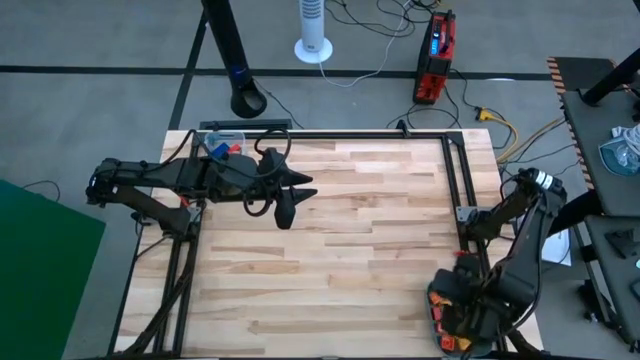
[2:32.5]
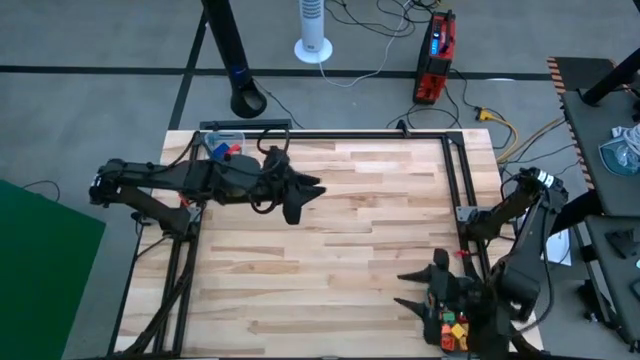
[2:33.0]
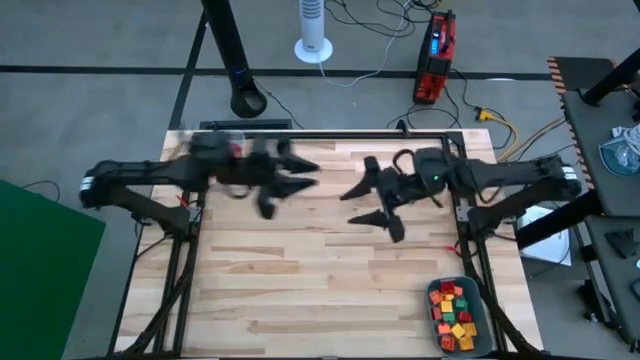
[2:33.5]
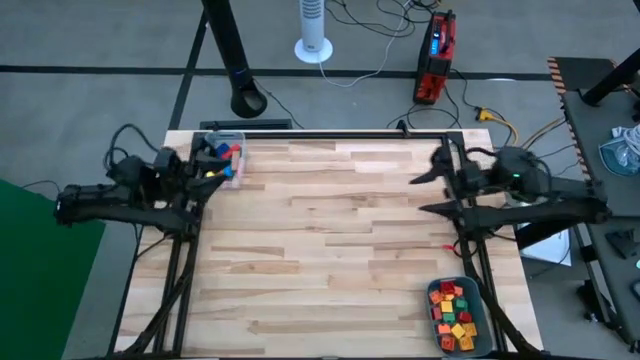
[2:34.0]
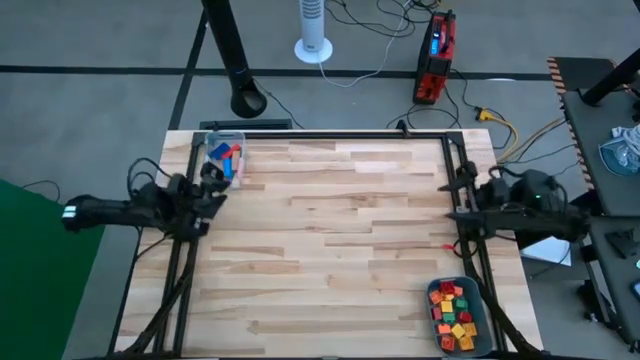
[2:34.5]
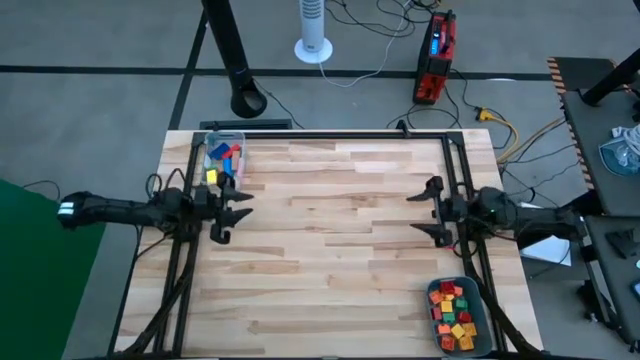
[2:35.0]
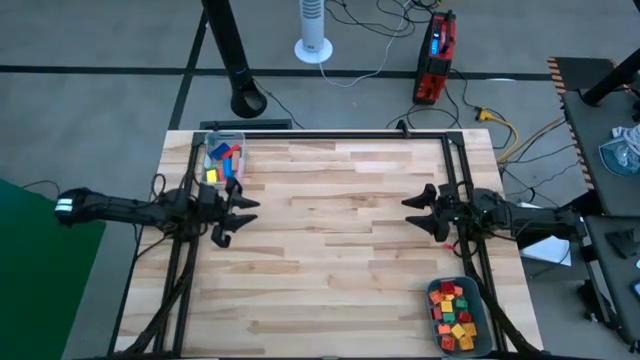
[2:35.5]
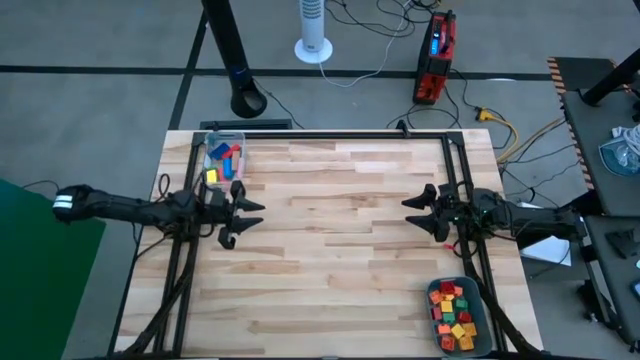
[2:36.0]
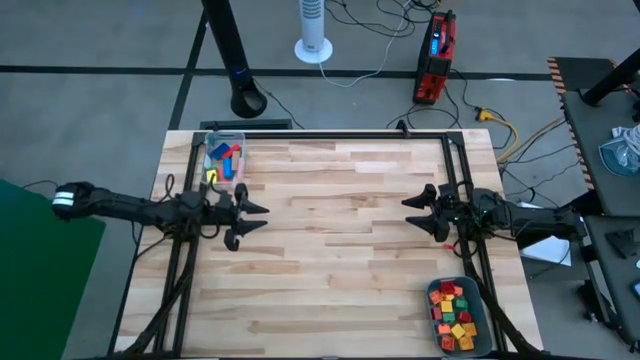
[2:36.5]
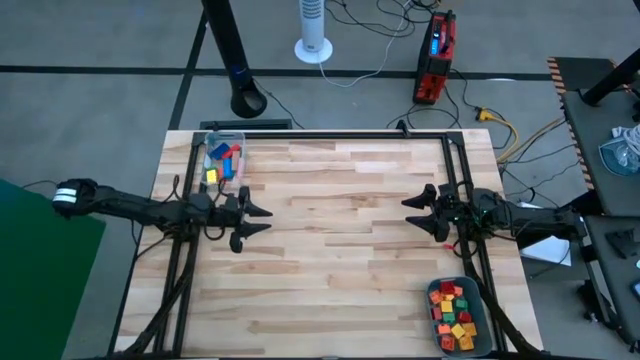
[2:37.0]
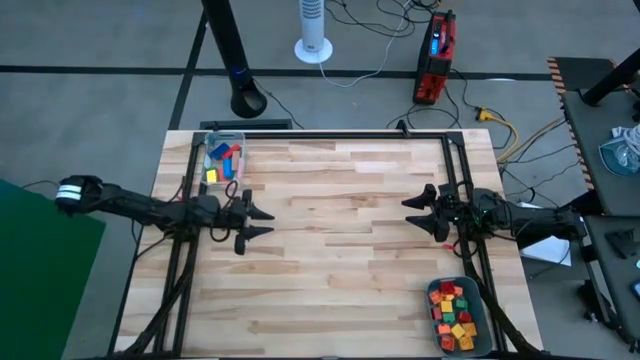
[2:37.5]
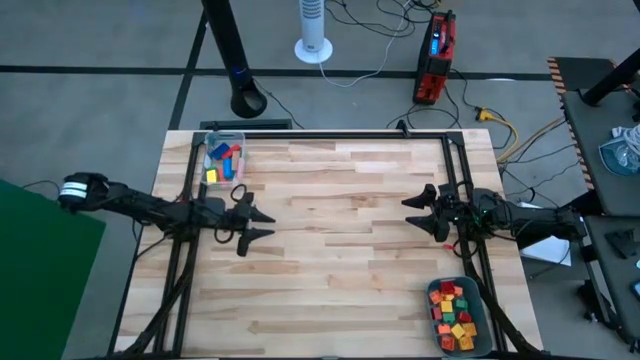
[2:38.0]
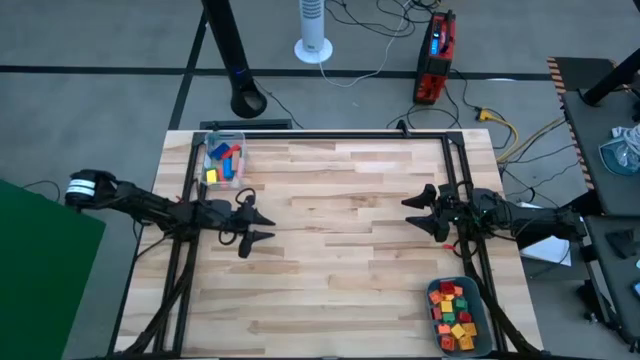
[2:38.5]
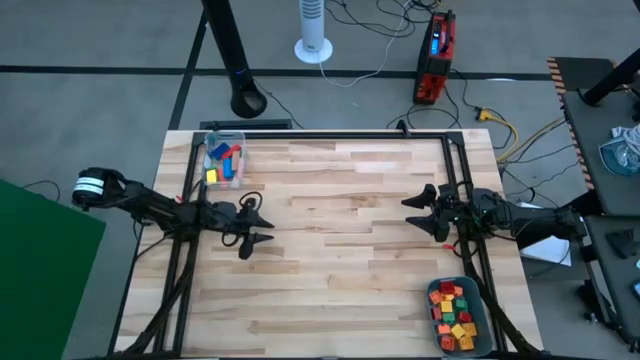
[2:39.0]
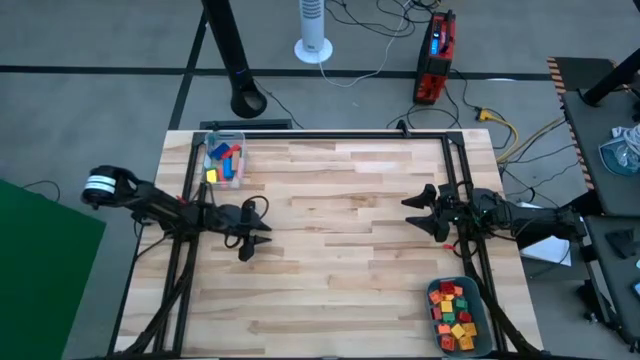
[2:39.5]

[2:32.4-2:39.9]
Task: Sort blocks by size
Return to Home Position

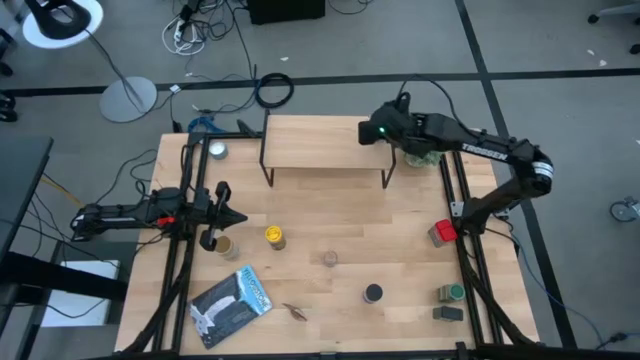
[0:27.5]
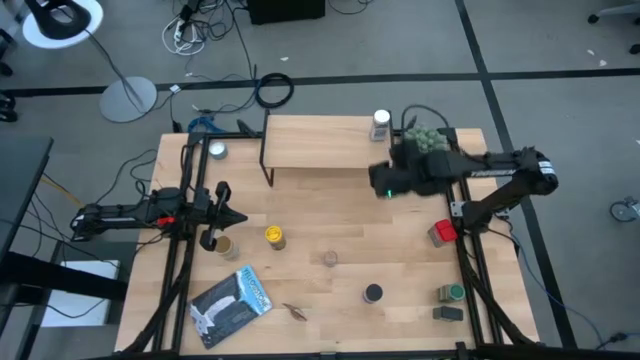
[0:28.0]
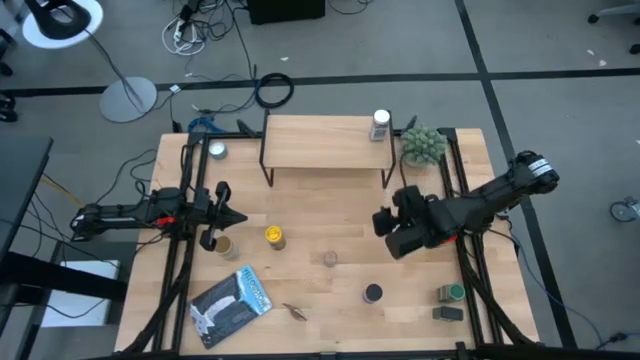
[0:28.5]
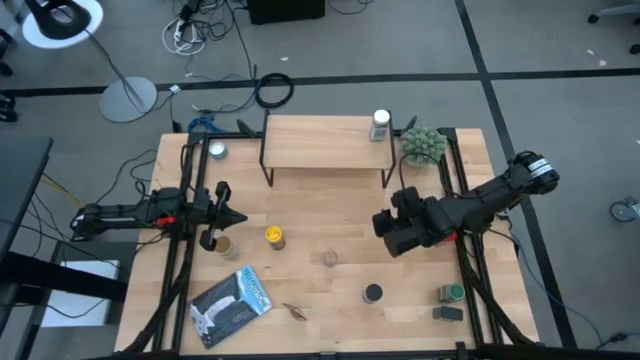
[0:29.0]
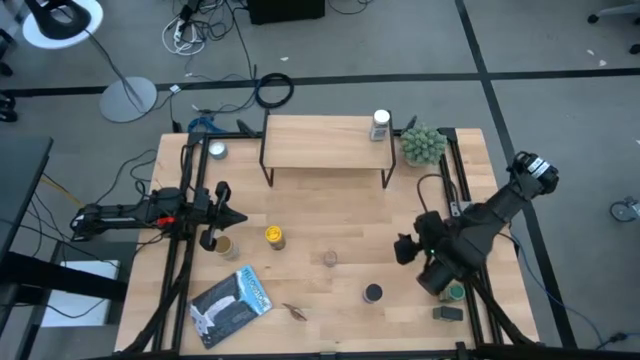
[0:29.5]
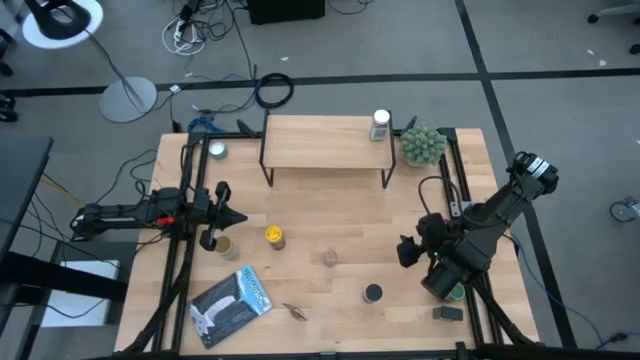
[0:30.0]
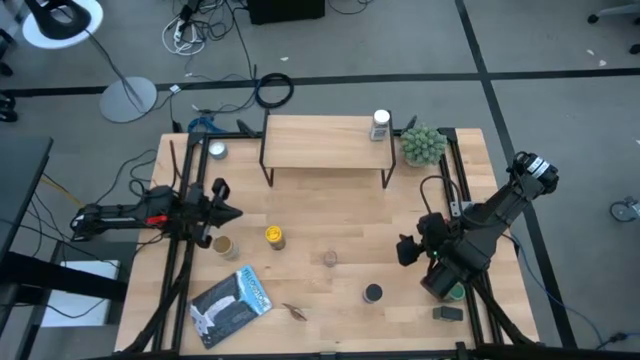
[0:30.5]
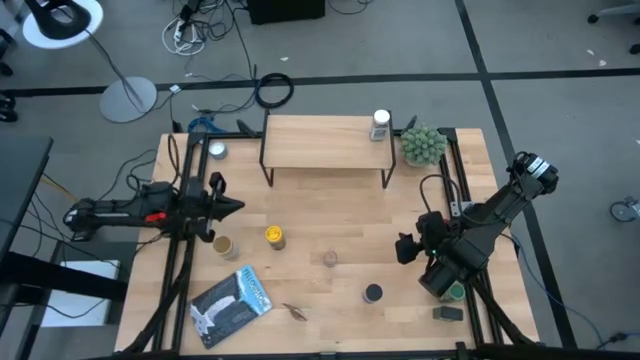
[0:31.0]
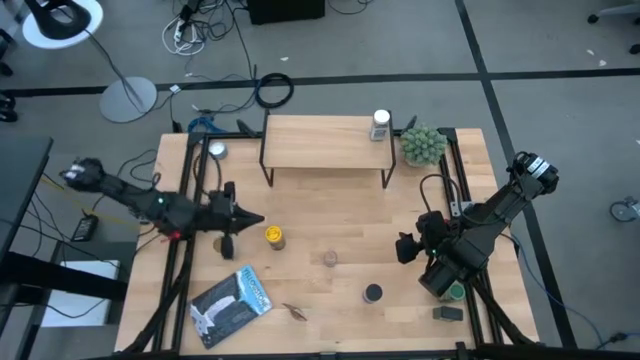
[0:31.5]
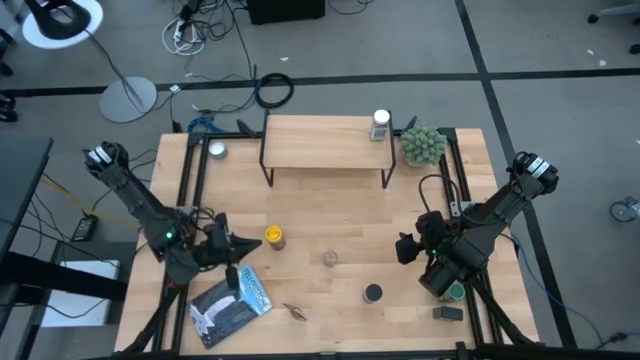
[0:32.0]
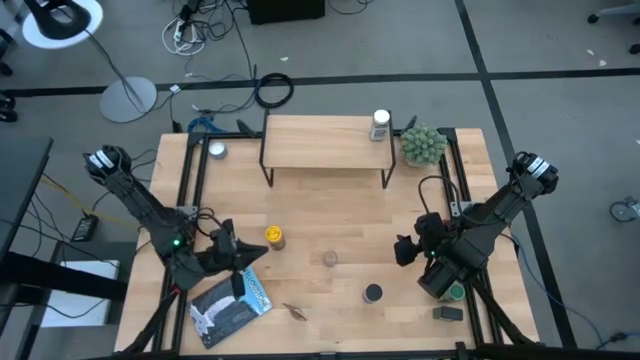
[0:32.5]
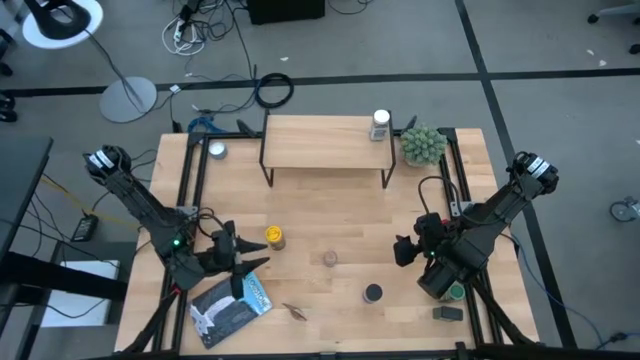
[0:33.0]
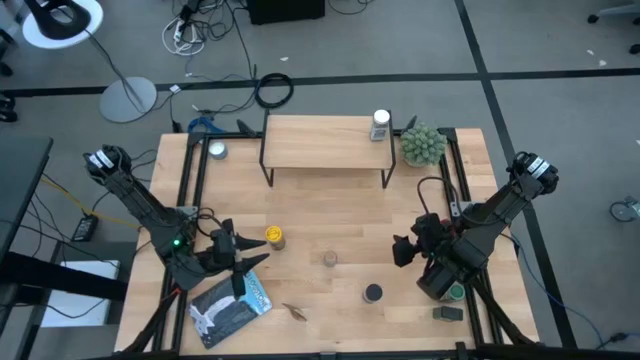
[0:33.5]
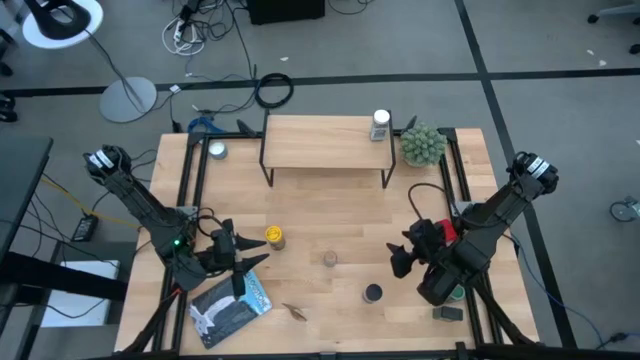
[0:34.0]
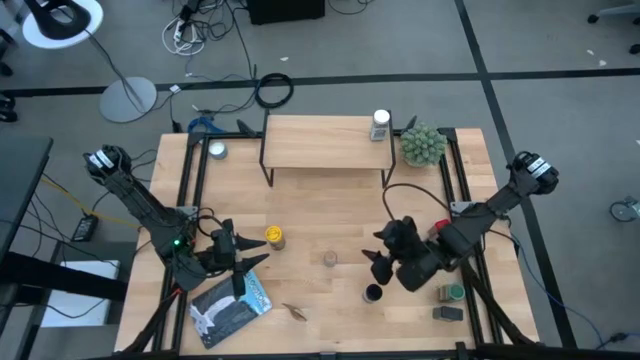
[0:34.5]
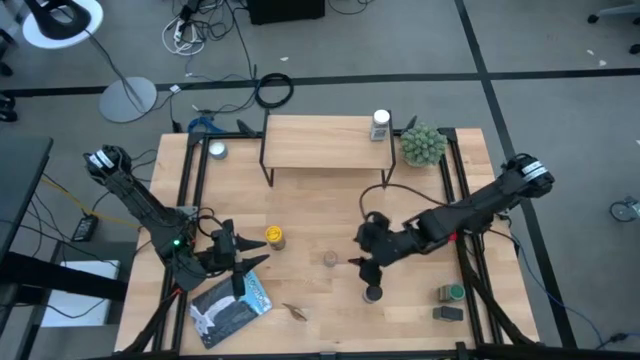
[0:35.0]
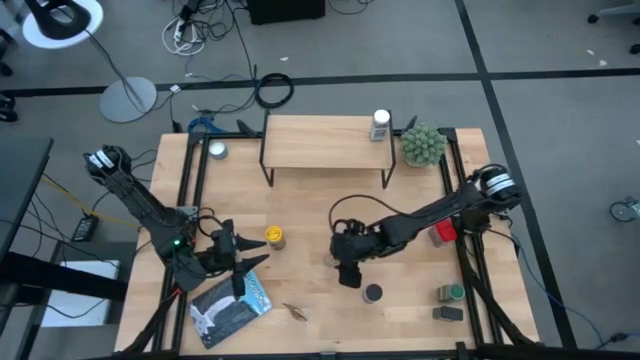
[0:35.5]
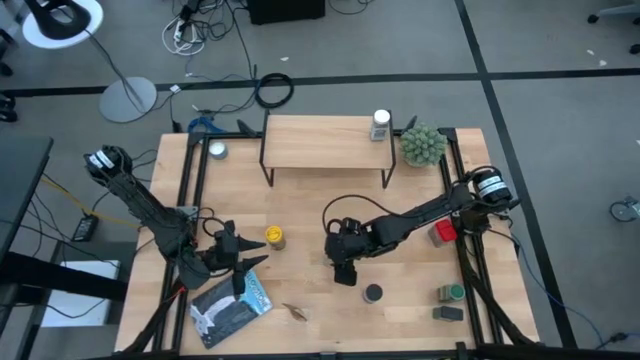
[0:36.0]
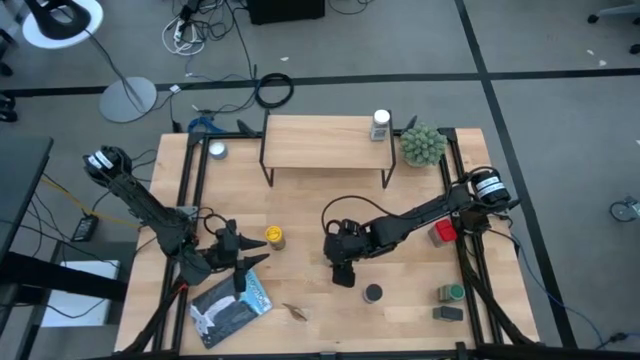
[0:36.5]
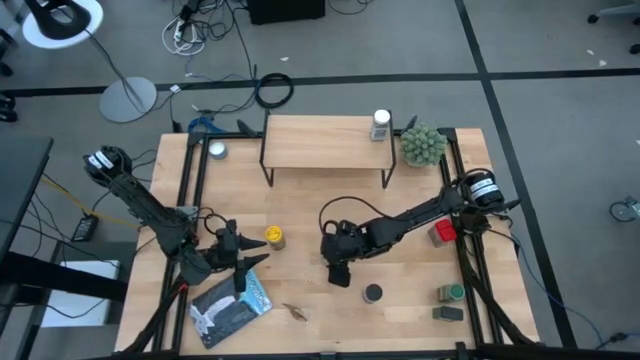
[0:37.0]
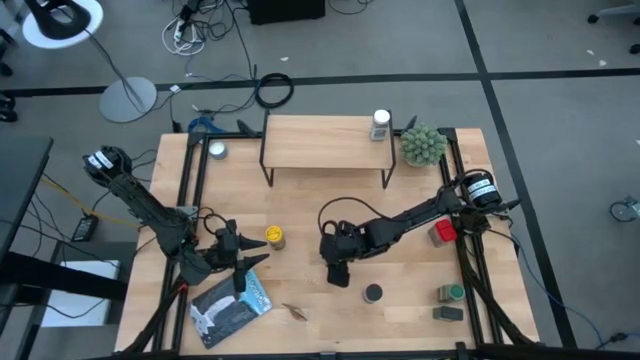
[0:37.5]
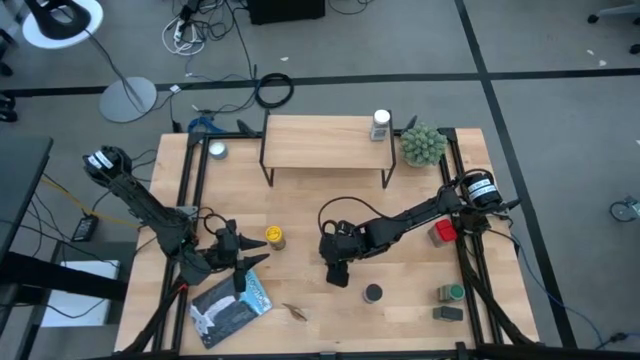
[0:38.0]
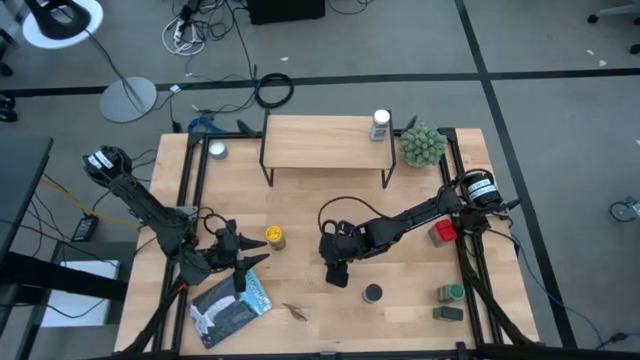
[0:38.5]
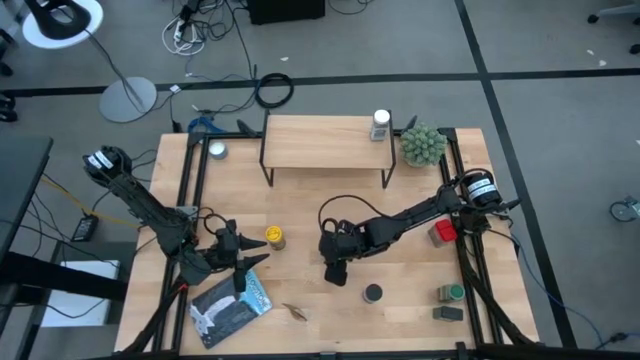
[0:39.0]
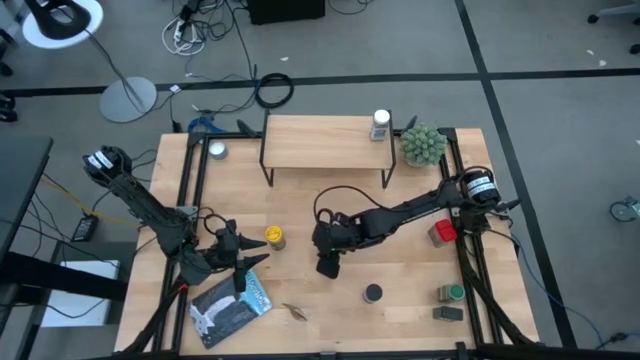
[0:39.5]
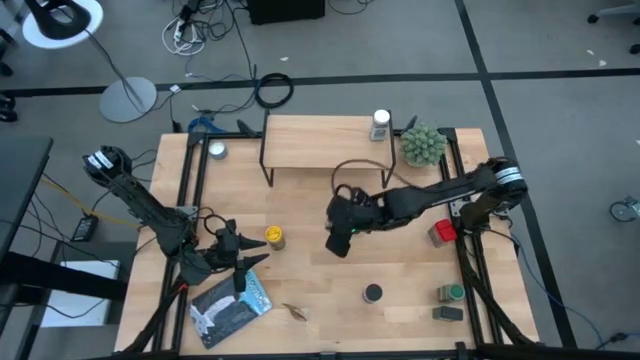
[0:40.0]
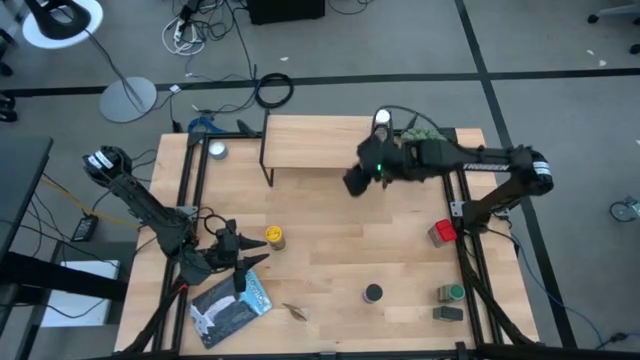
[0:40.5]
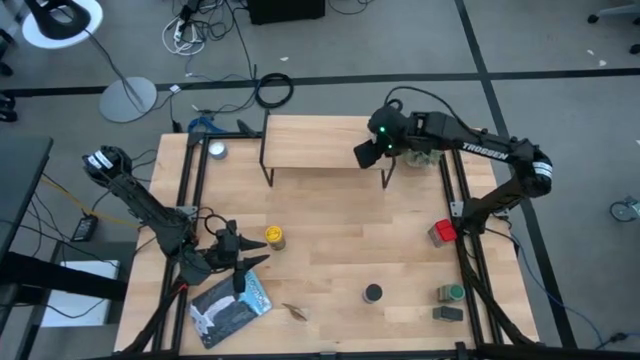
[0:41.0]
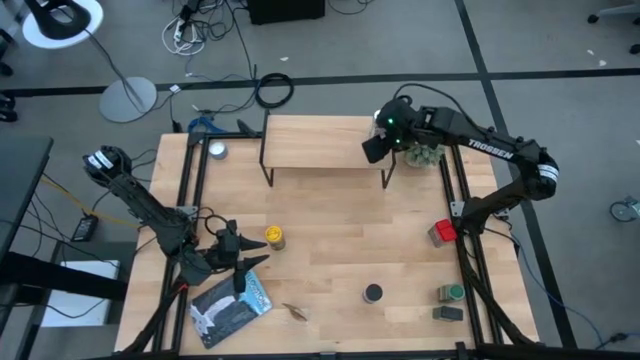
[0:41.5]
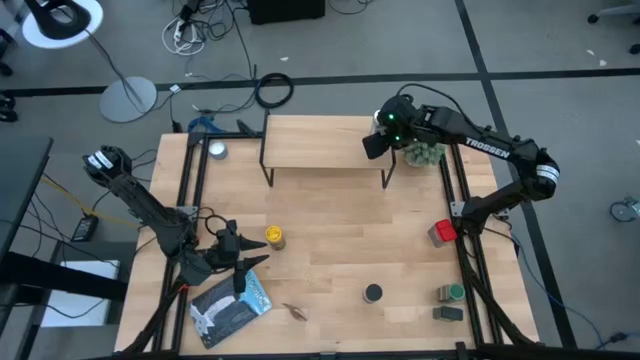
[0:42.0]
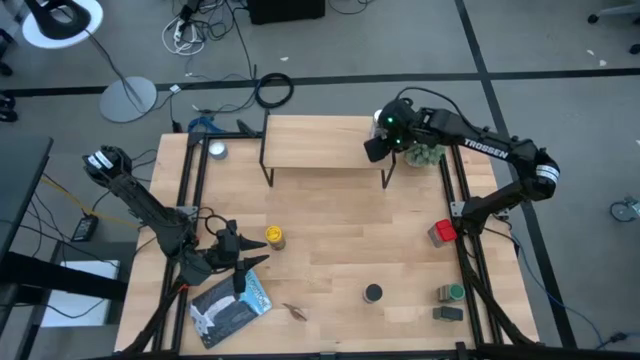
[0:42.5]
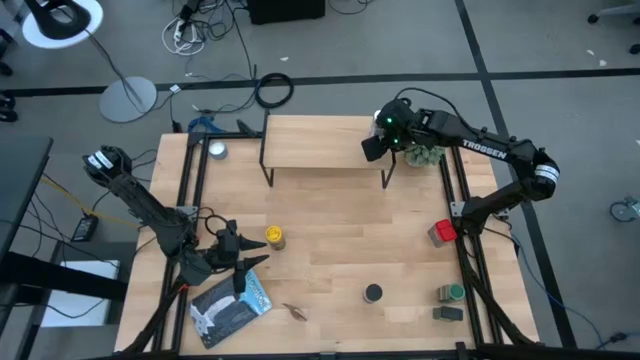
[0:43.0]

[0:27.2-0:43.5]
Task: Shelf spices
Put the transparent seasoning bottle on the shelf aligned with the other white seasoning bottle
